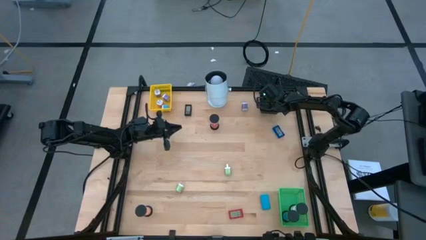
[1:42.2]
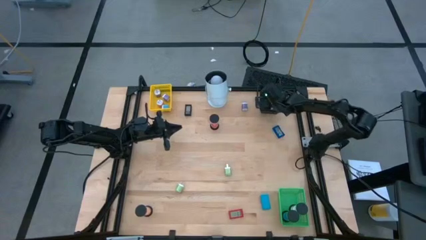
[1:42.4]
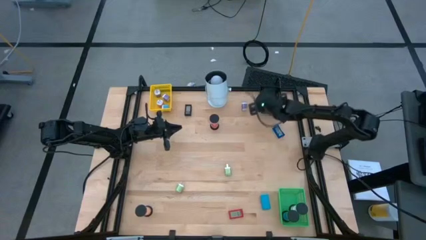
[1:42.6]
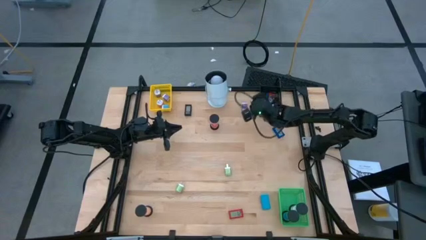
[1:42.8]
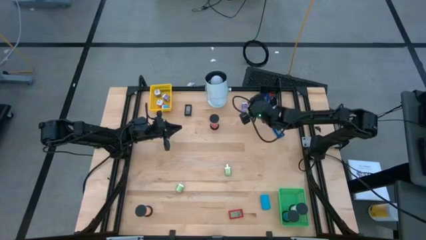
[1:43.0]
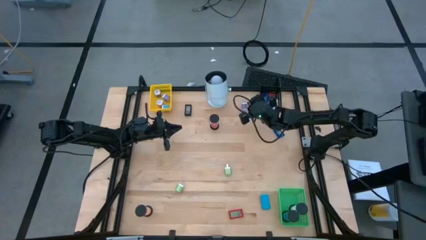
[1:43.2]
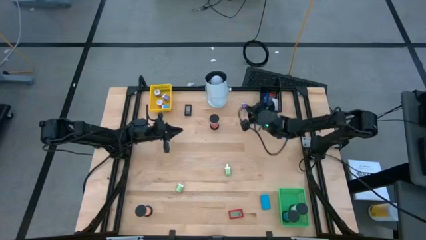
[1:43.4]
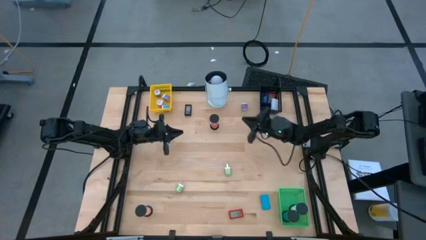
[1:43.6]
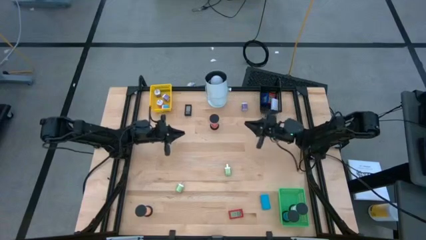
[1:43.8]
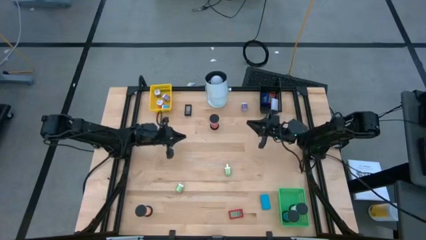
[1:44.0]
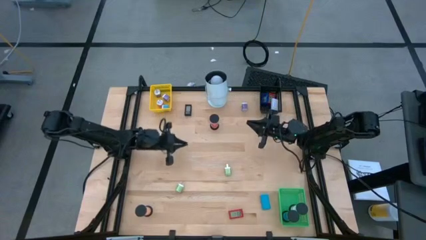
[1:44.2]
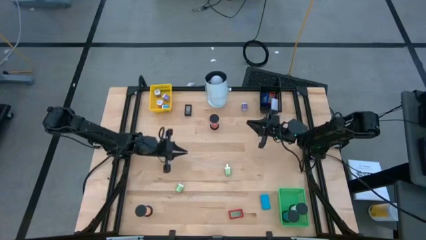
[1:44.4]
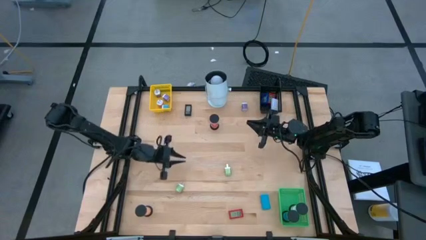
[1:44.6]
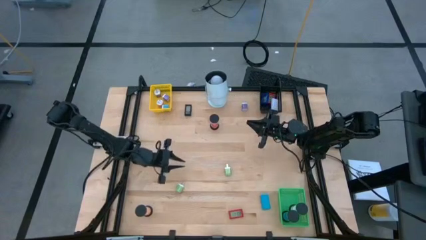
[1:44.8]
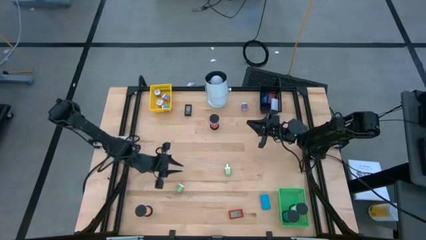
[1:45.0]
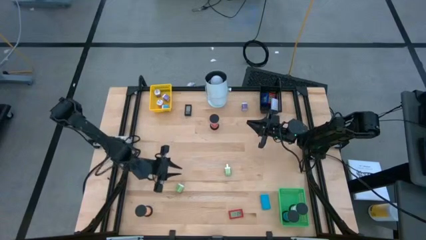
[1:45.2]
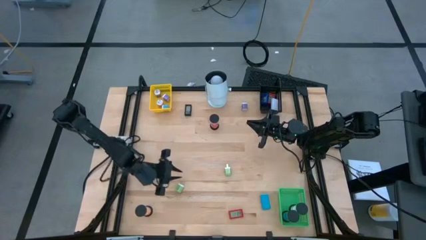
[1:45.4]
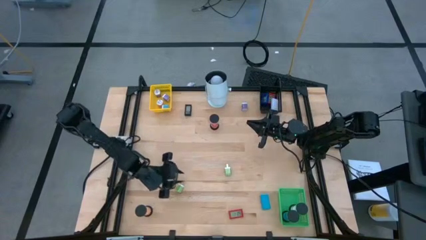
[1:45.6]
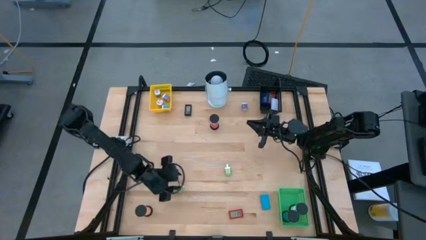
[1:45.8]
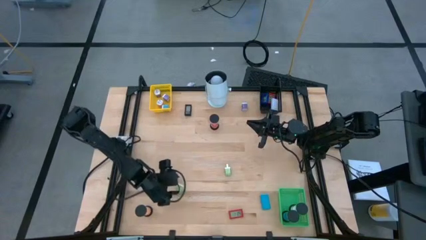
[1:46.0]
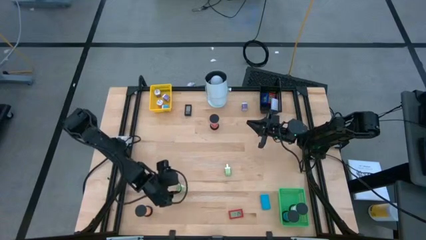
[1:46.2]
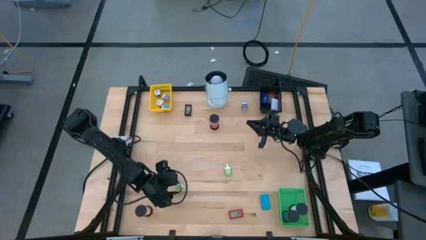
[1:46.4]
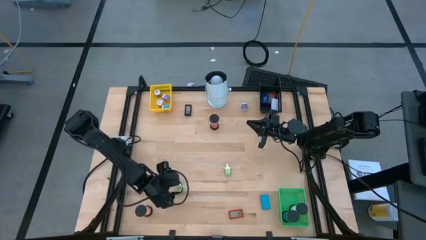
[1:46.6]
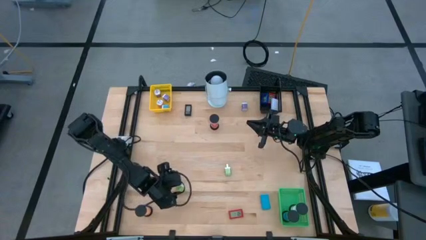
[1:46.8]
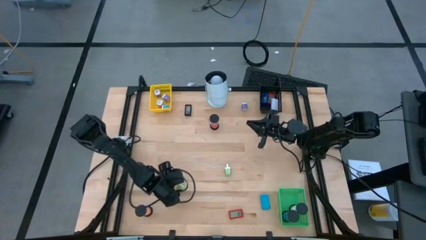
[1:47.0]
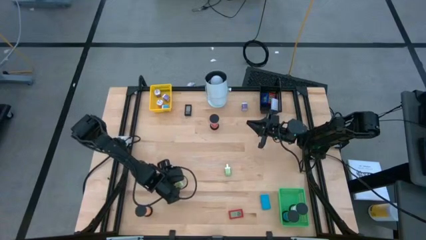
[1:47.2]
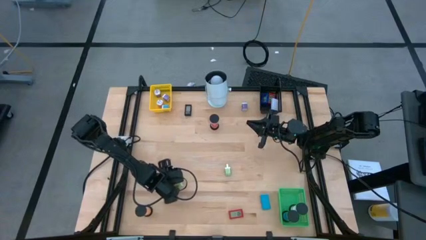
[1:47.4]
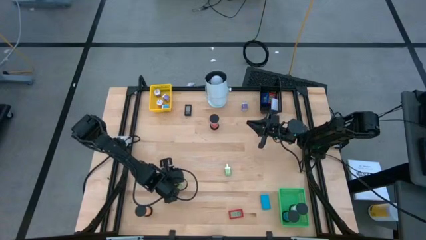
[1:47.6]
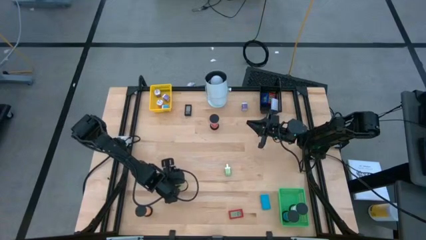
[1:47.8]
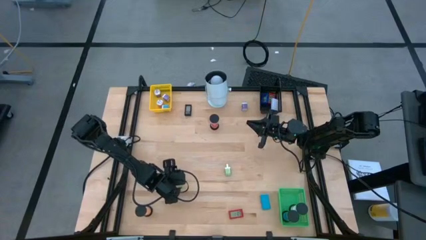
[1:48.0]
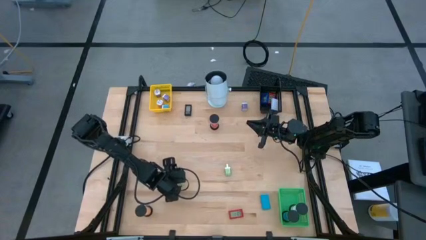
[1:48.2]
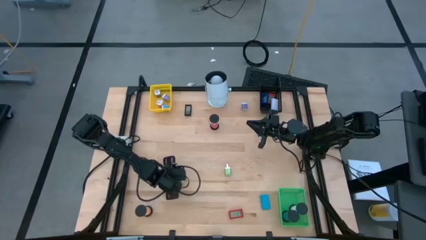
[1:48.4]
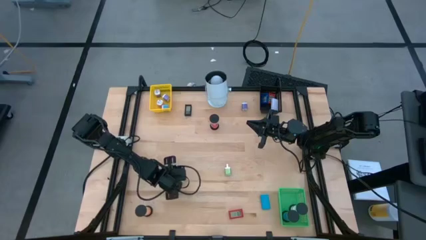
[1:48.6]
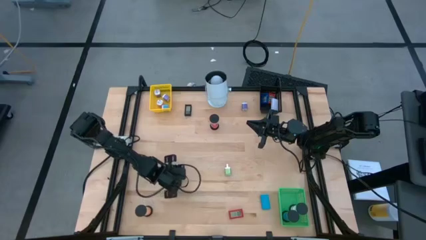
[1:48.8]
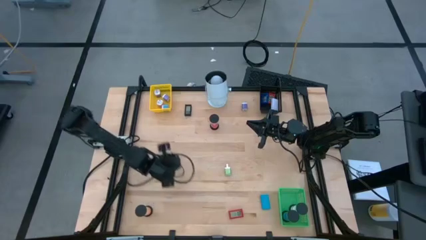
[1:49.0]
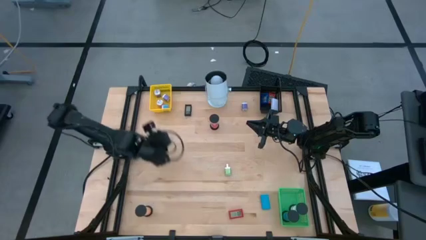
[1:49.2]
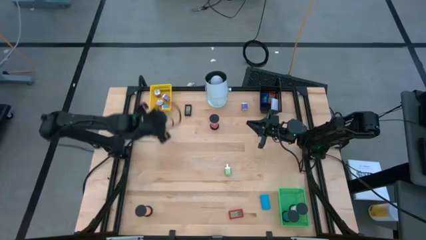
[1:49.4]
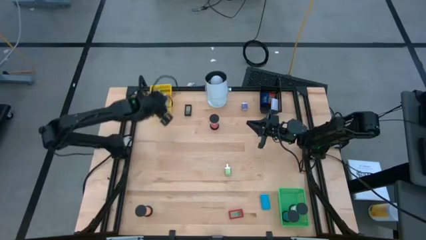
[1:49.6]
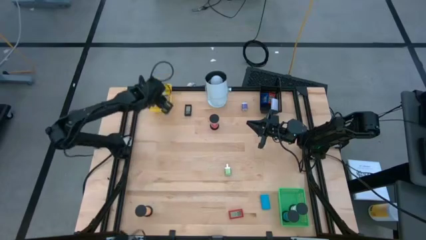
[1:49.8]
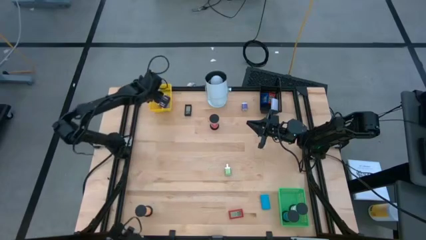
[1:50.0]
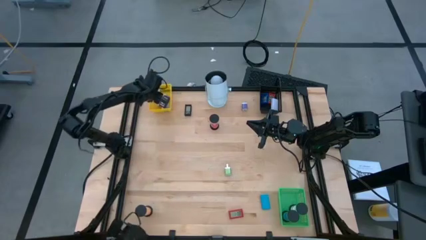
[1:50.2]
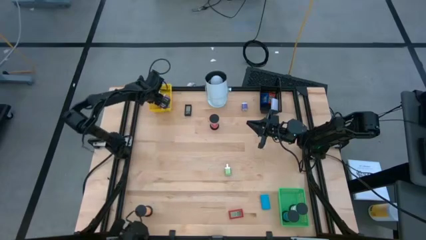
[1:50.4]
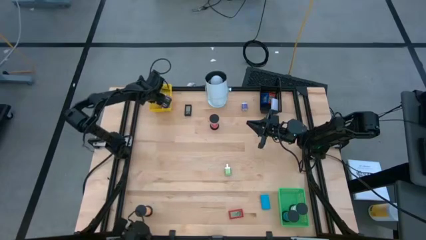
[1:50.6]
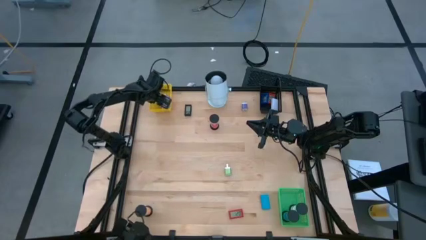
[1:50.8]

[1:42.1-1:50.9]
Task: Pick & Place Office items
Put the green charger adapter into the yellow bin

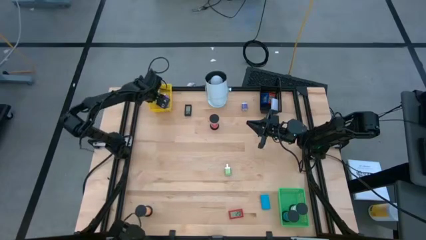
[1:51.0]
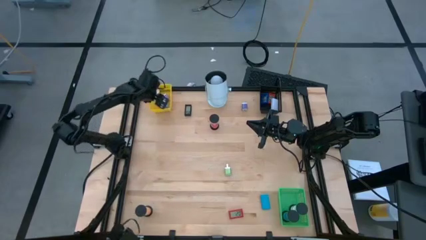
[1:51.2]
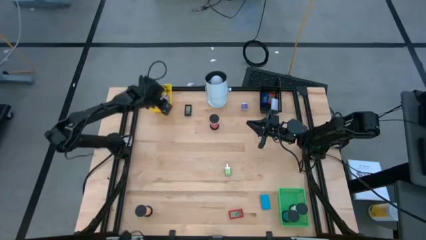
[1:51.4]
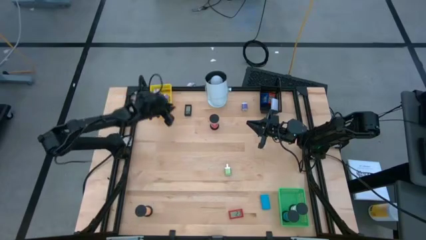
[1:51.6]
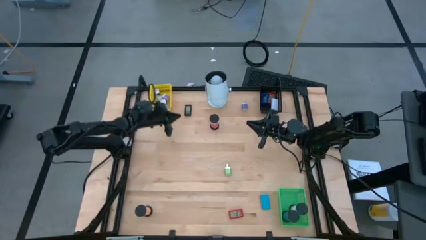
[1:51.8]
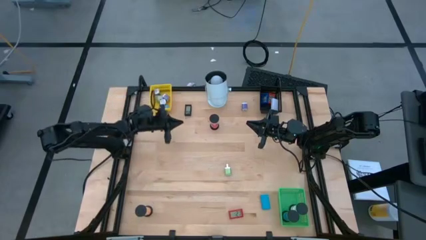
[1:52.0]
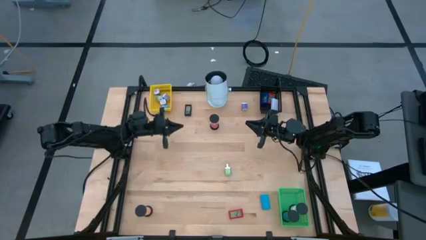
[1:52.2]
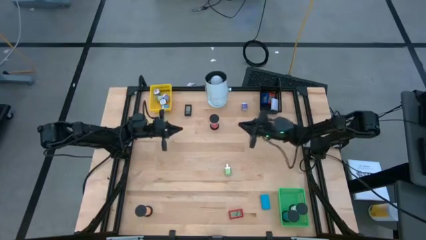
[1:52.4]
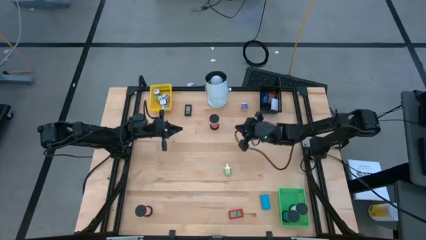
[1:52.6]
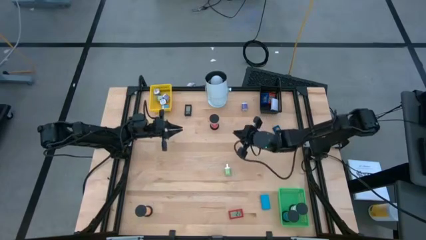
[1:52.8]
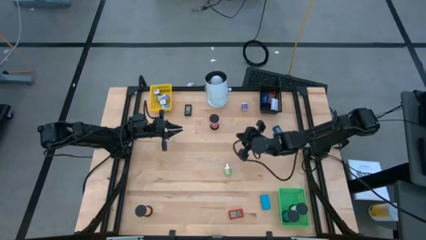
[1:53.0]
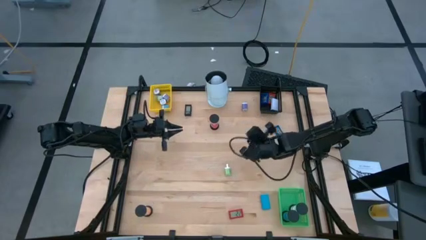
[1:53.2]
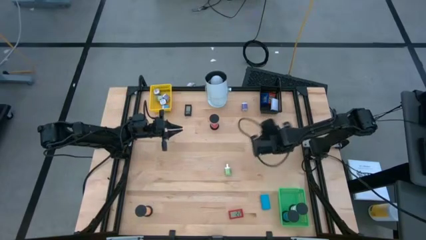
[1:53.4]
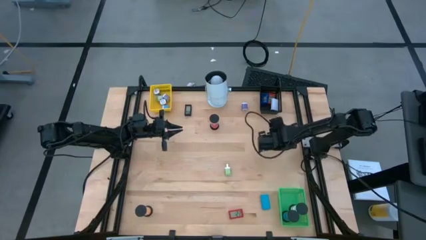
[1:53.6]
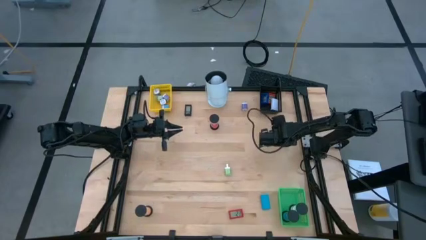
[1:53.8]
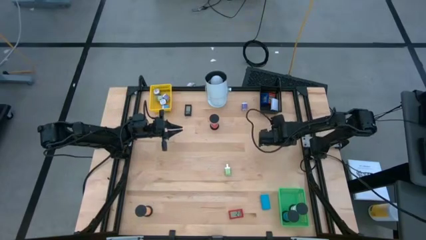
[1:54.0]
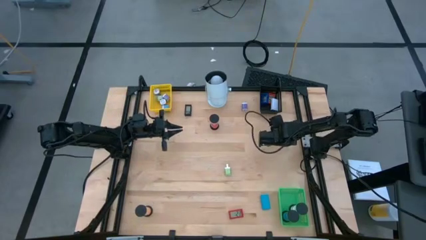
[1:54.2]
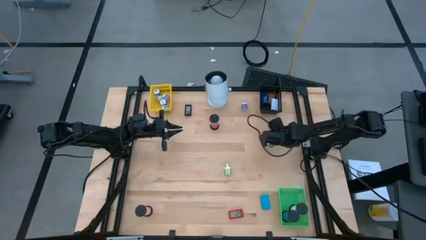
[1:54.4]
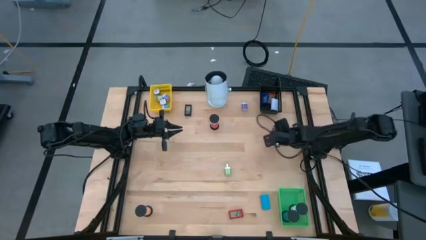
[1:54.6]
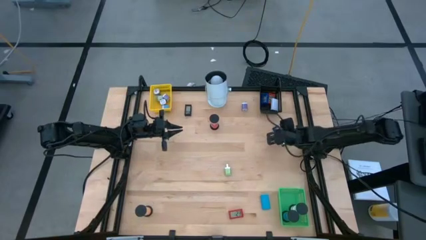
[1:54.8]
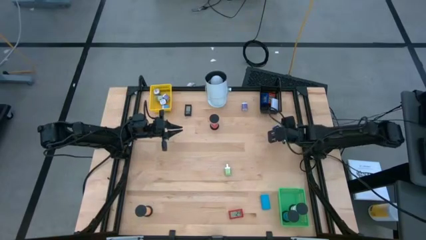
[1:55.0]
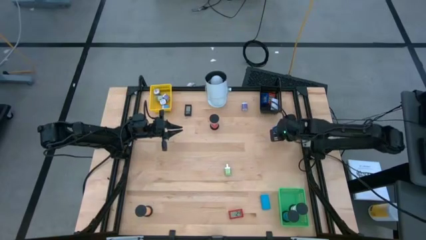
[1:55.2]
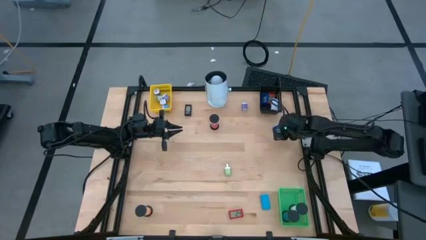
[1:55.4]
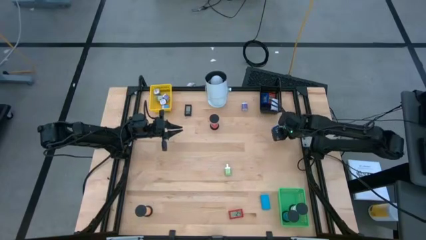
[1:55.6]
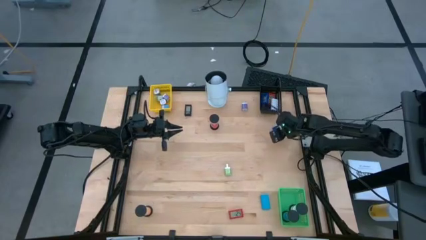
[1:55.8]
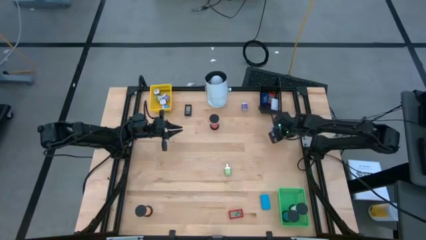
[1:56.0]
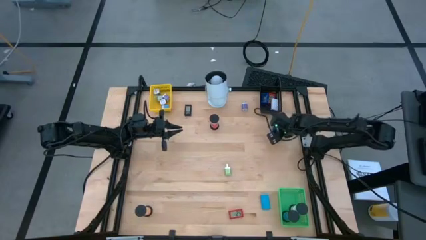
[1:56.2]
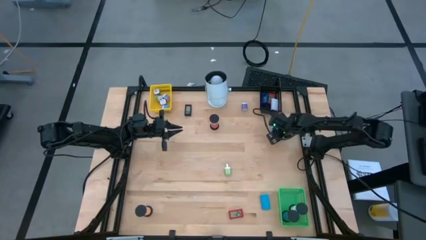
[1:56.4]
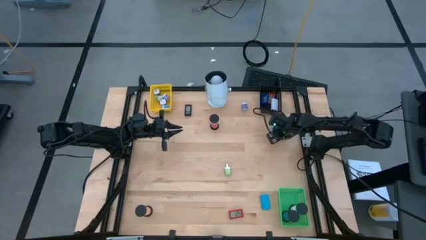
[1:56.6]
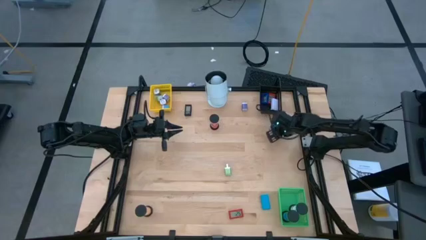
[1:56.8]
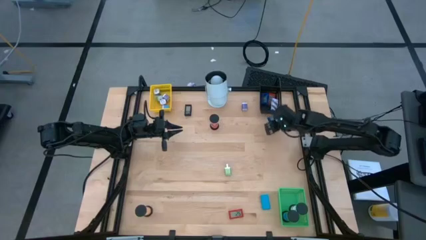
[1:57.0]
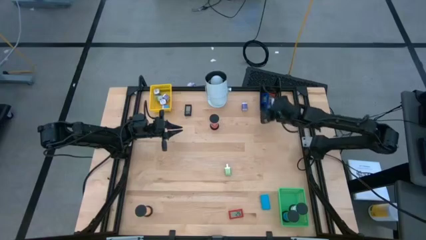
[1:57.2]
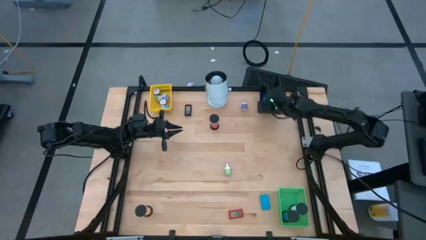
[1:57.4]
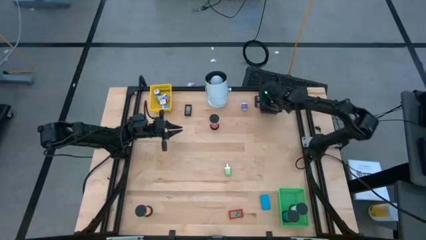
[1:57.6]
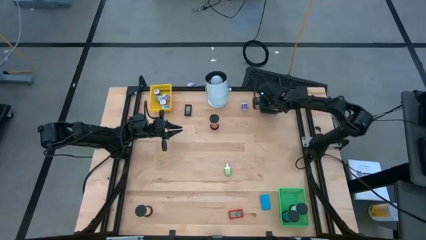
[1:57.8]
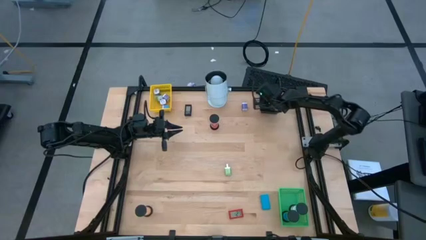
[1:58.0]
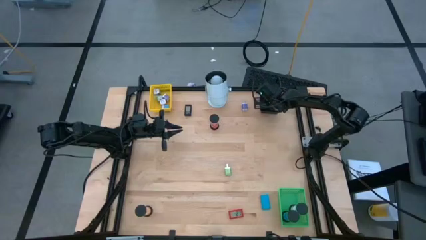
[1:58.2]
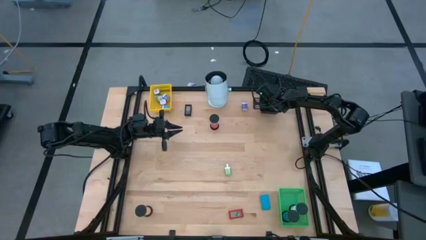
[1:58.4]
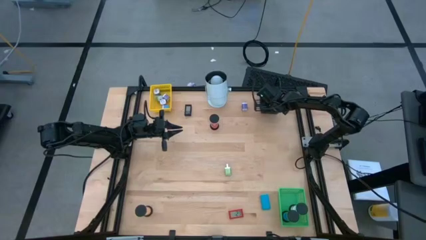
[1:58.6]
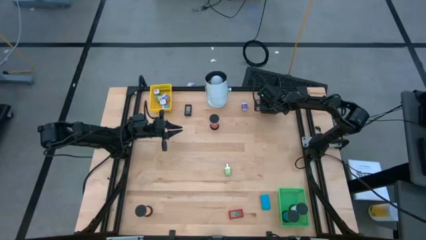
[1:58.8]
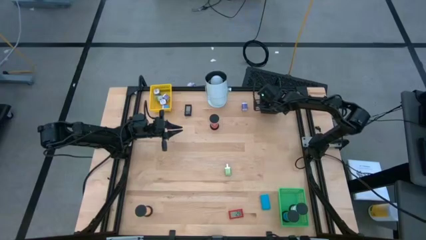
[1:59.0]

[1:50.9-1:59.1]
Put the blue timer into the black bin
